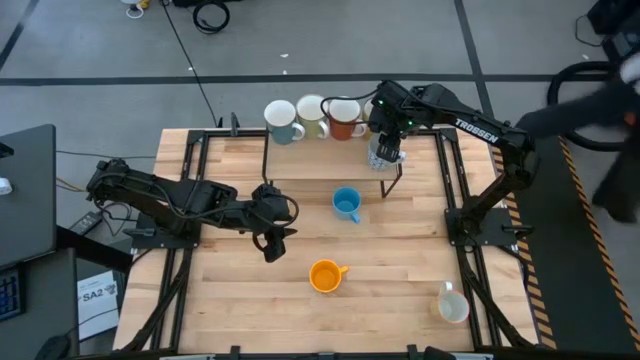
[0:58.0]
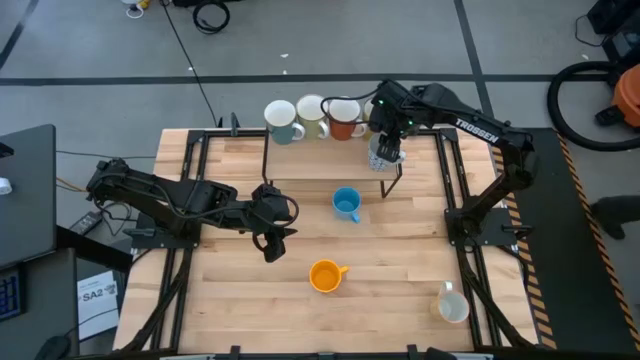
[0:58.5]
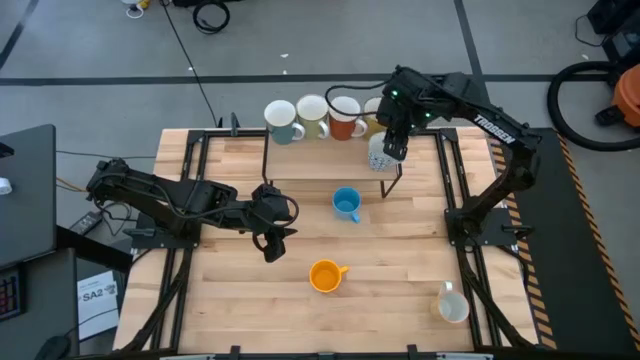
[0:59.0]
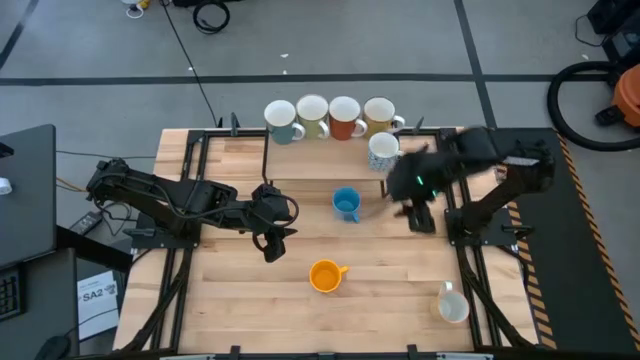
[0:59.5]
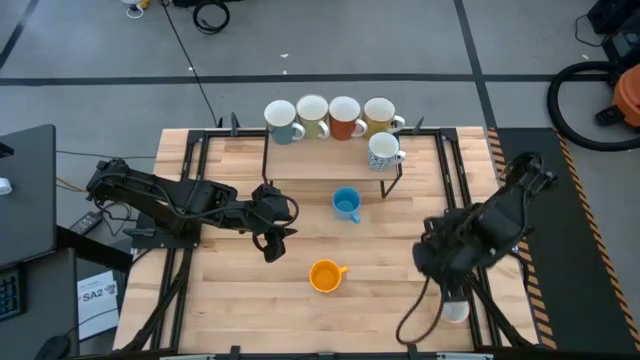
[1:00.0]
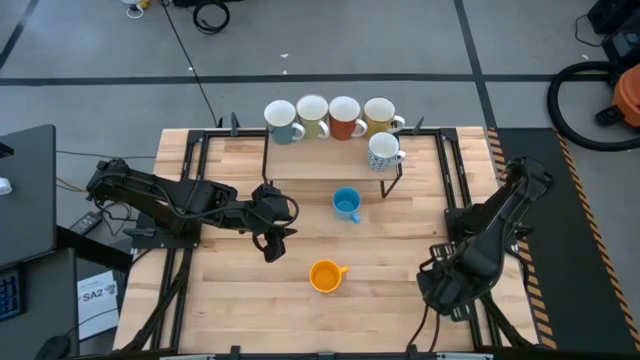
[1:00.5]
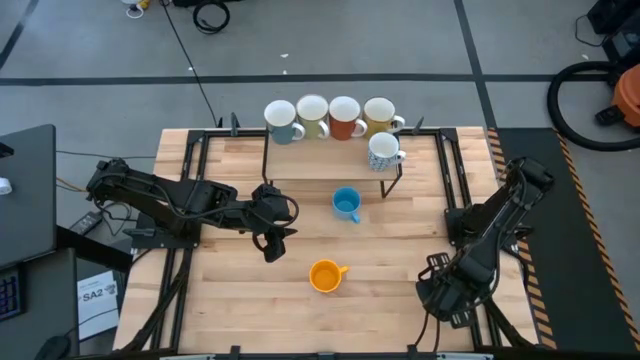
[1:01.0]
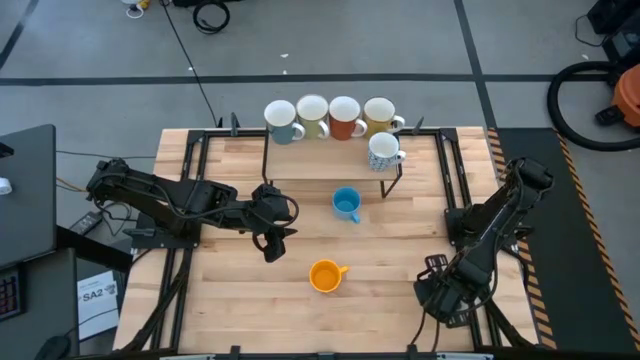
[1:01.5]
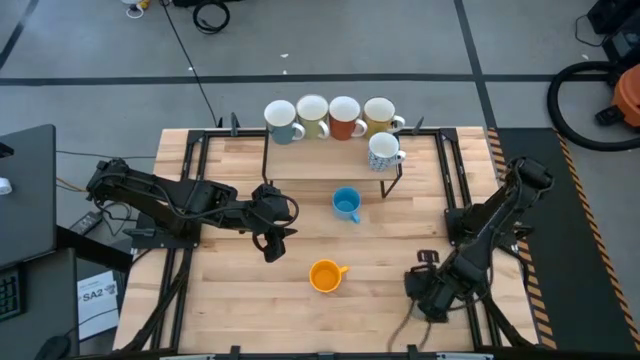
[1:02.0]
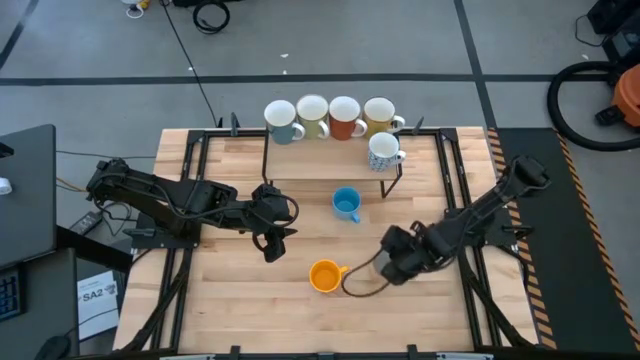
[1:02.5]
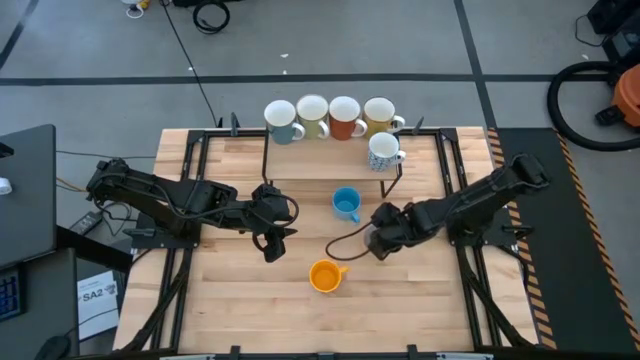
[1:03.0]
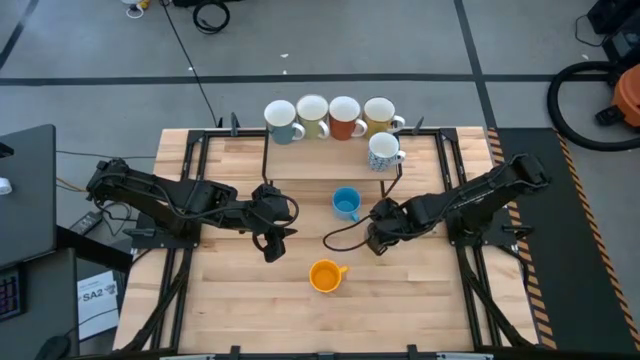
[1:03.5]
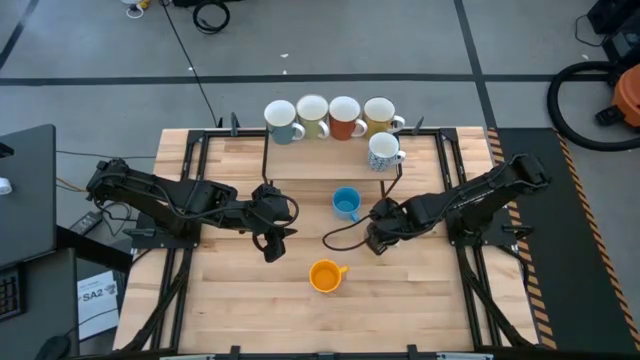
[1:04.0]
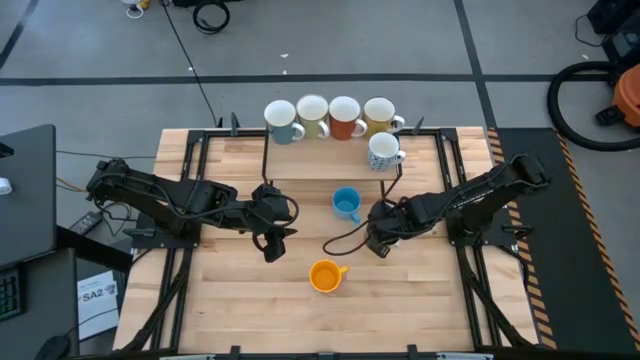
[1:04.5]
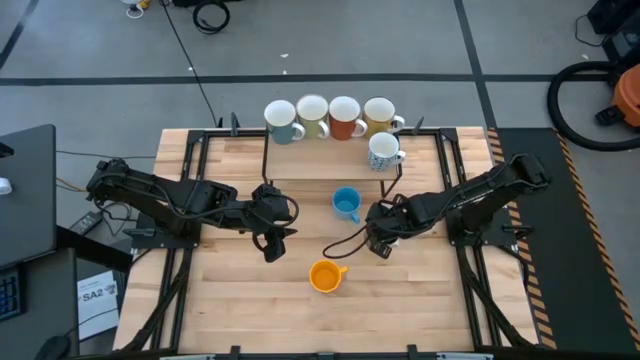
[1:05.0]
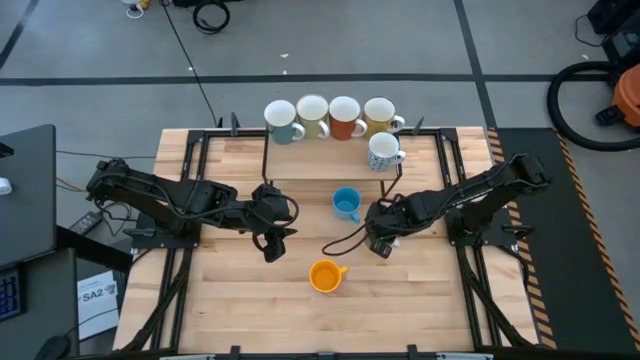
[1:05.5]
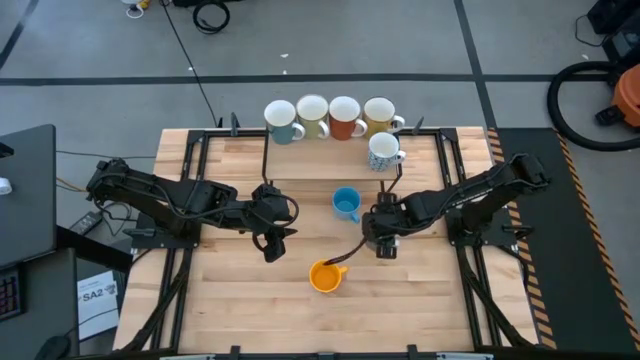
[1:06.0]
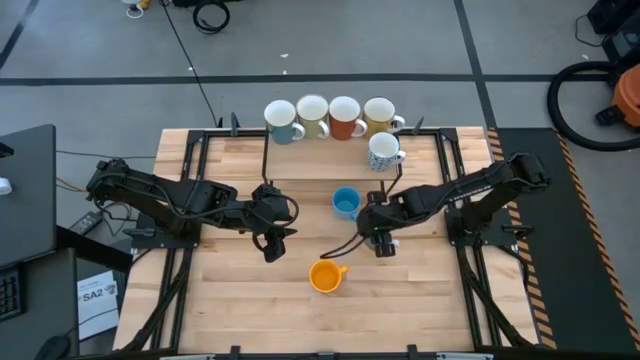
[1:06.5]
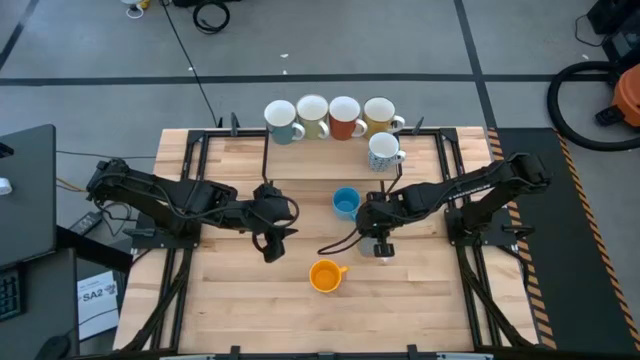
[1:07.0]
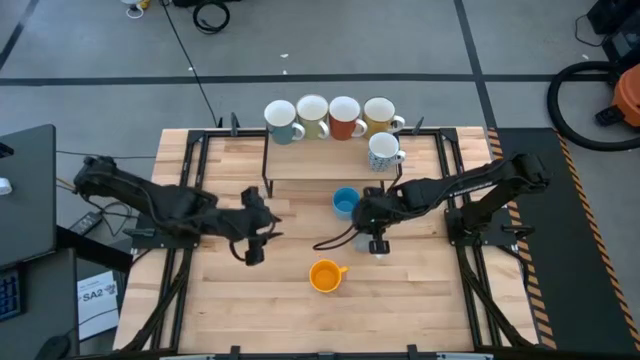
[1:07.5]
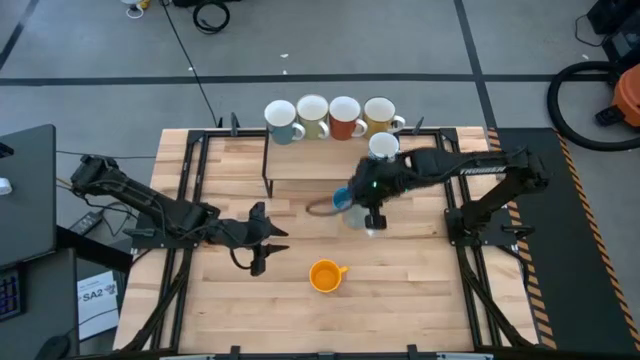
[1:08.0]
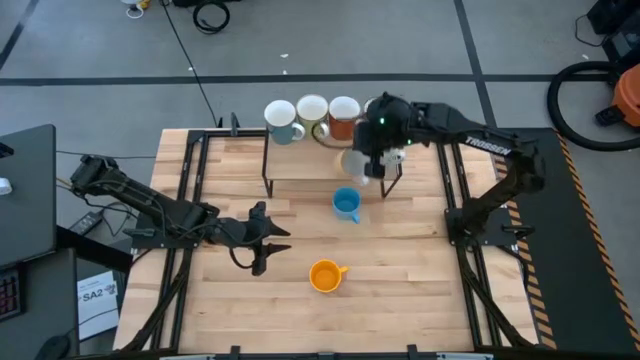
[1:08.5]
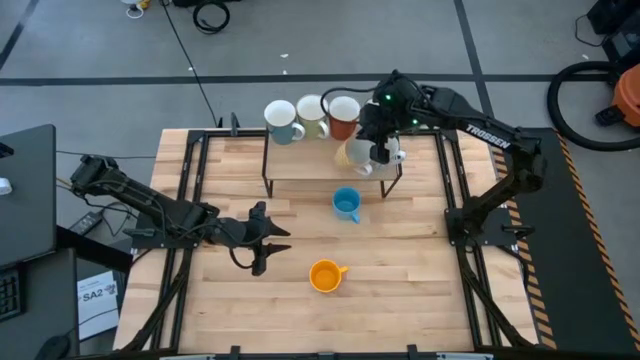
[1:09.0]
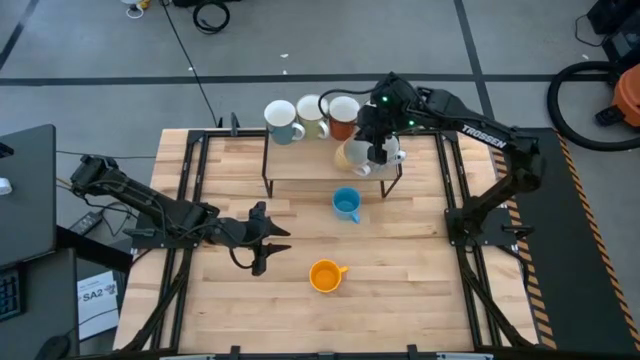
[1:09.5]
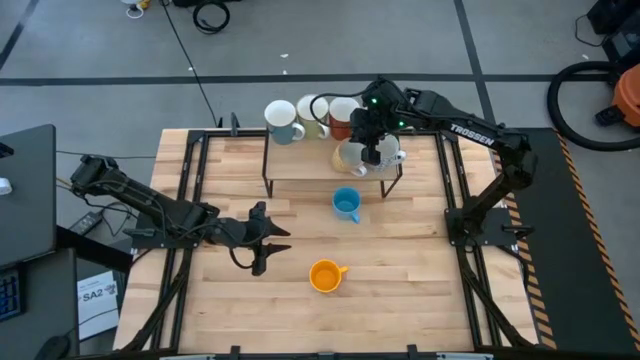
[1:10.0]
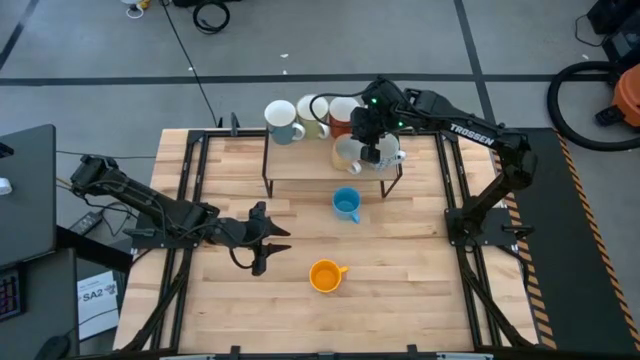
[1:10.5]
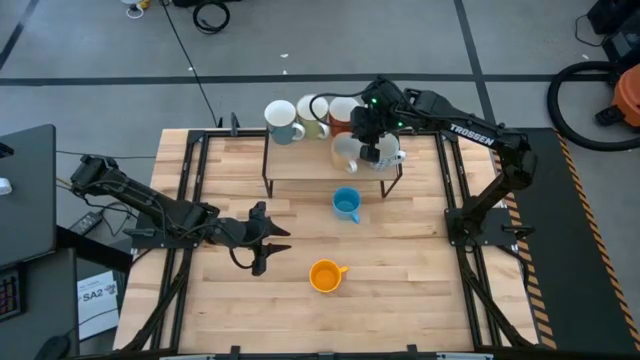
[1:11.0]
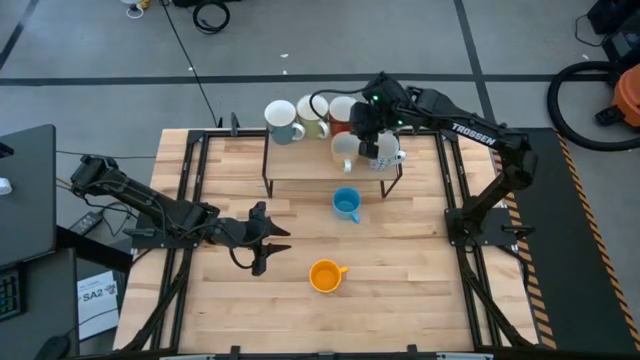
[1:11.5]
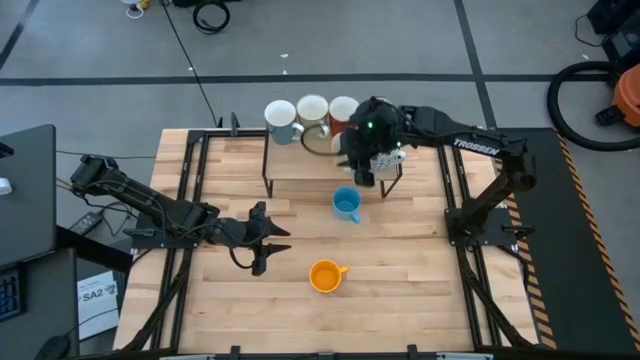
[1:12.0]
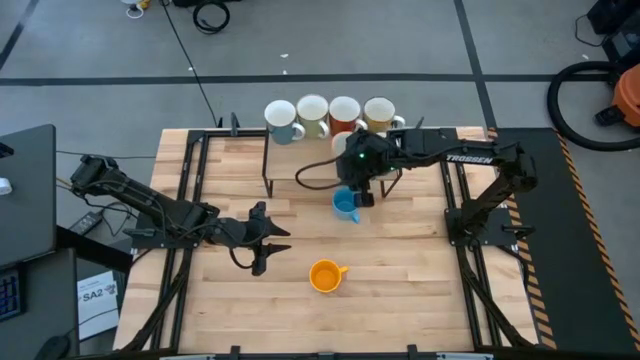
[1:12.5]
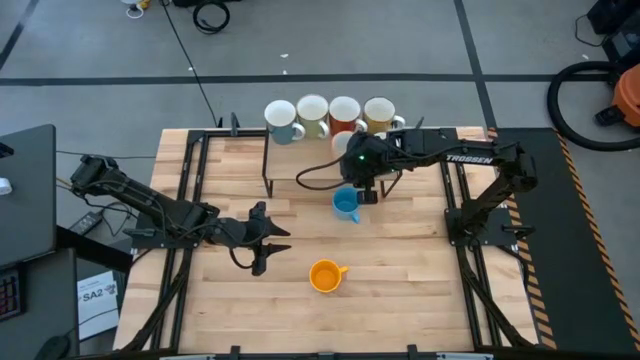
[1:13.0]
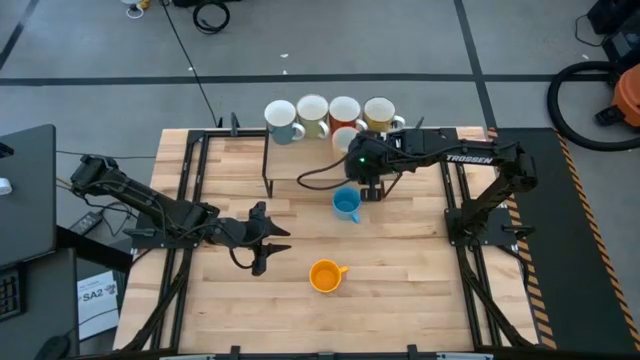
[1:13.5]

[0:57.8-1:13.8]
Task: Place coffee mugs
Put the yellow patterned mug on the shelf

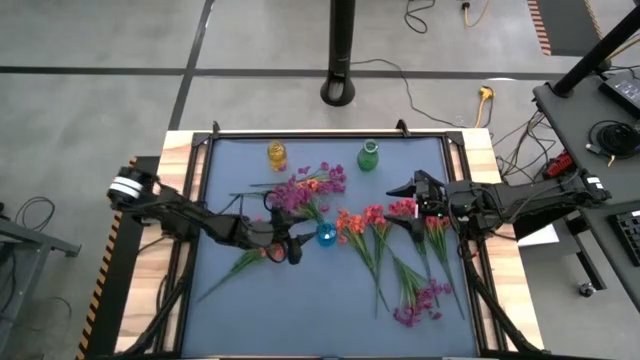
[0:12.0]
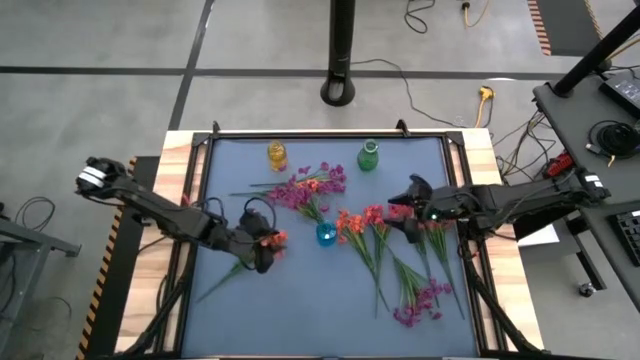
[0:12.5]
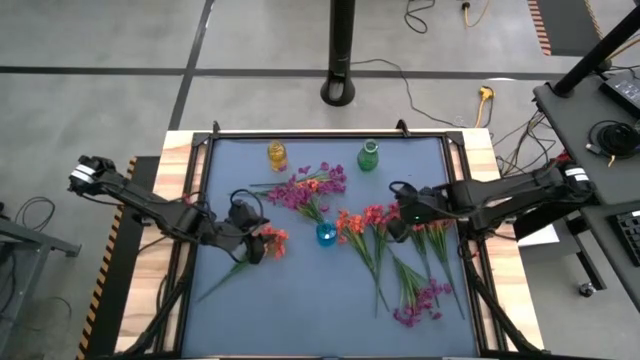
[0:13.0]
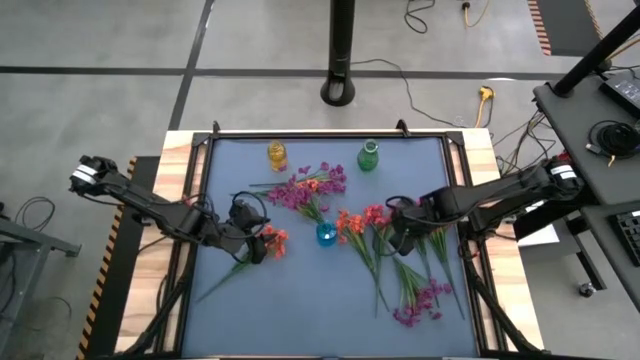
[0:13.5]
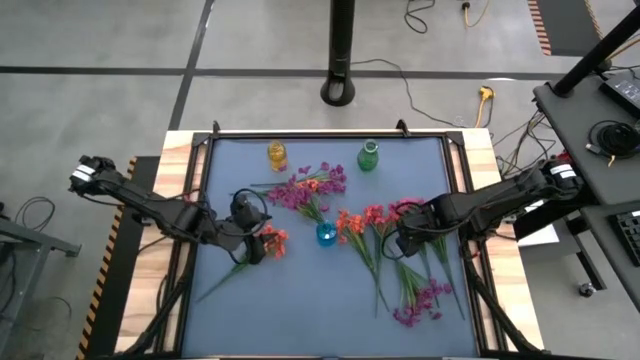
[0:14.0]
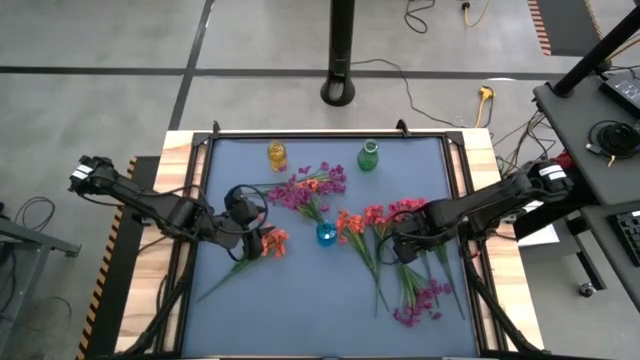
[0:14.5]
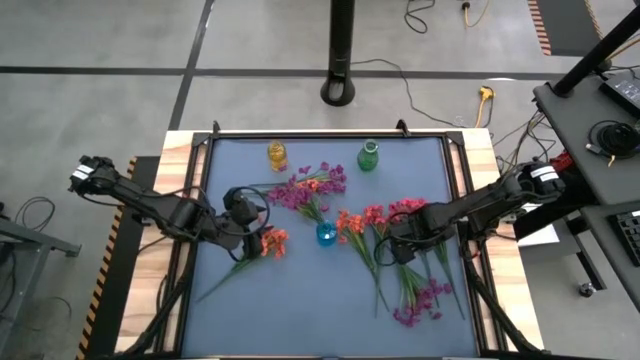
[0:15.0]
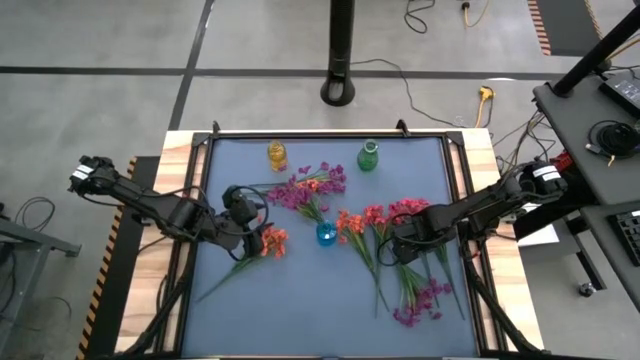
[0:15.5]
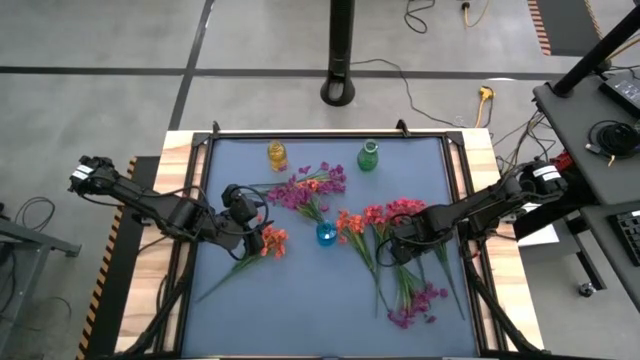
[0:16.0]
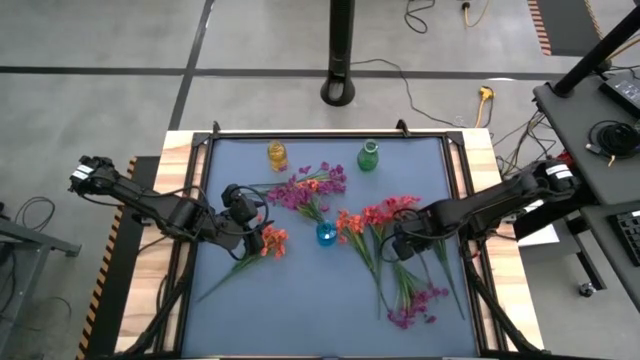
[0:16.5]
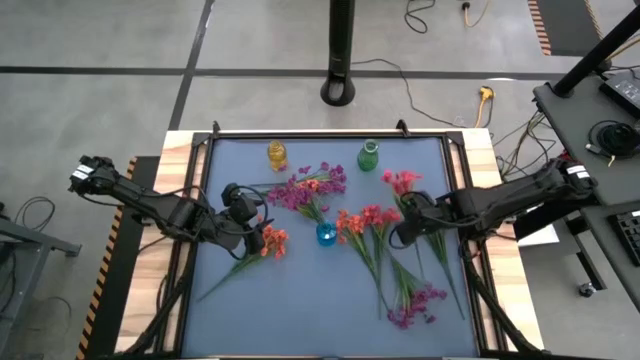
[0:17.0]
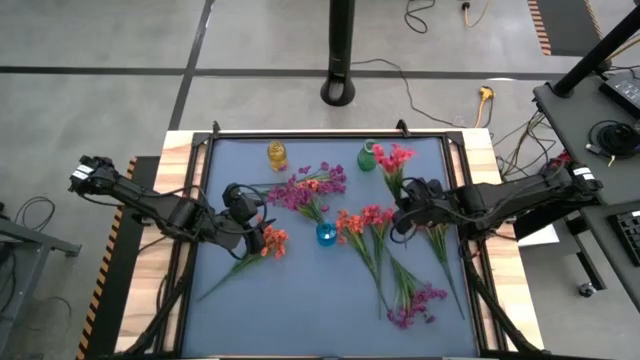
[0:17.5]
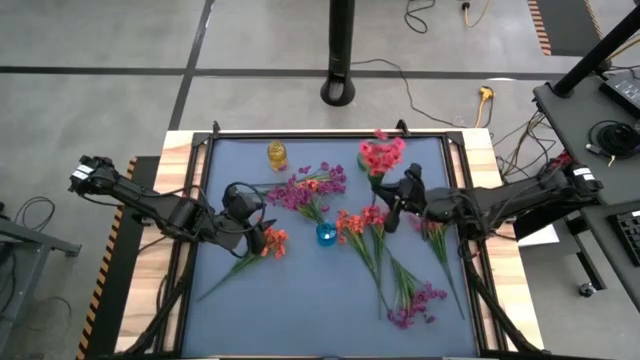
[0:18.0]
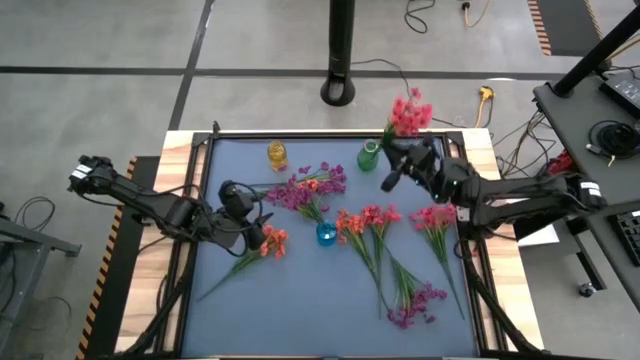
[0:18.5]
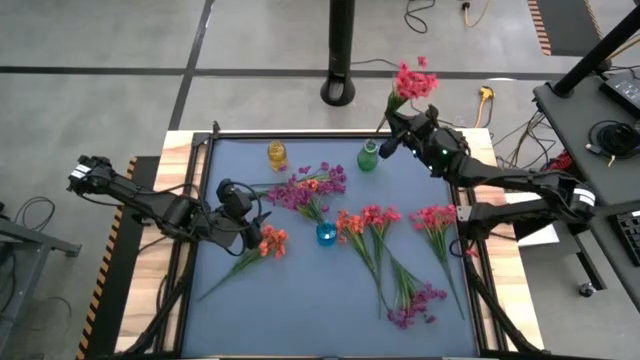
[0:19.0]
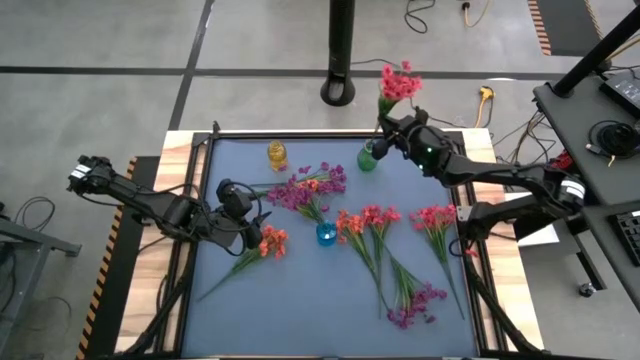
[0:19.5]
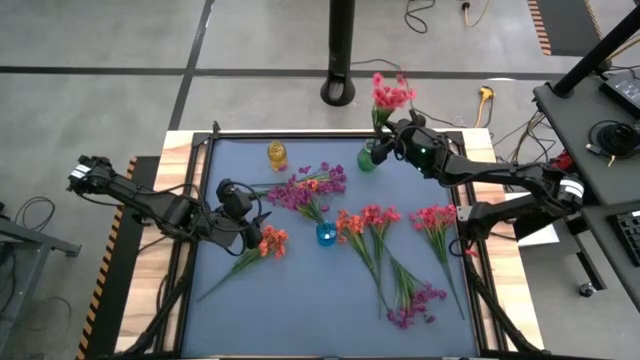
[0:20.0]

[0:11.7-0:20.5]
Task: Sort flowers into vase by color
Put the center red flower into the green vase
